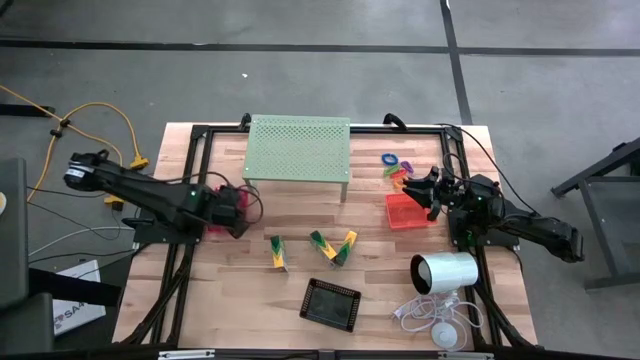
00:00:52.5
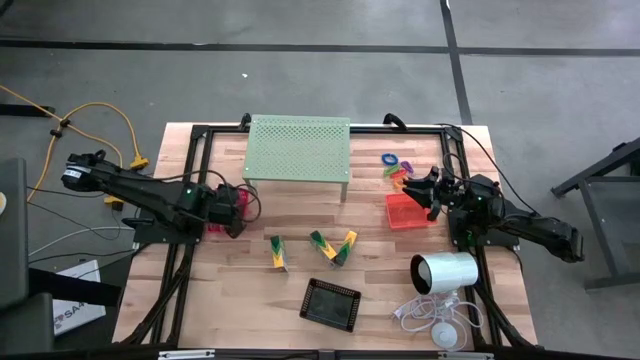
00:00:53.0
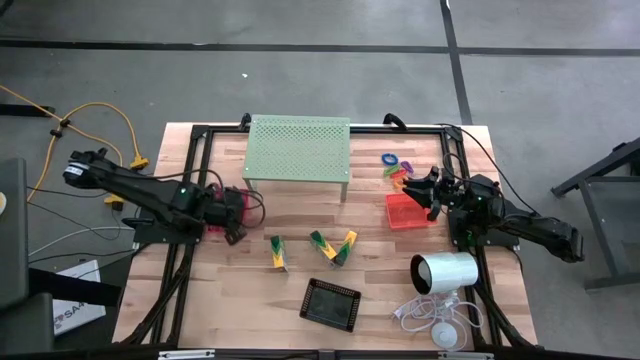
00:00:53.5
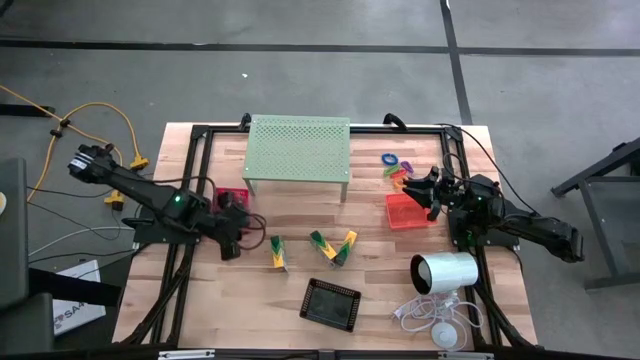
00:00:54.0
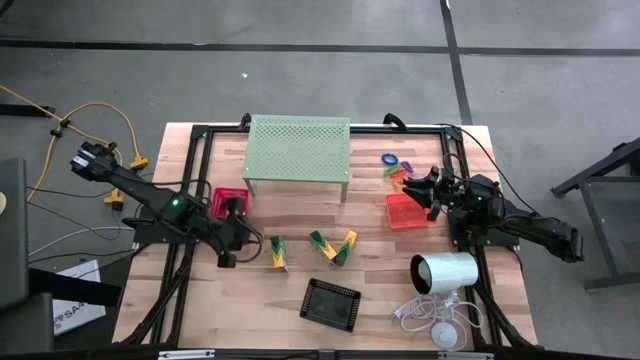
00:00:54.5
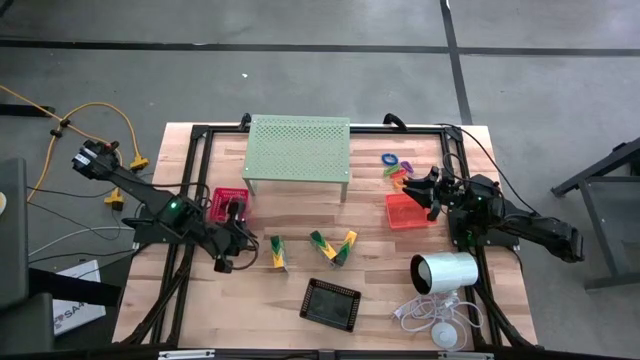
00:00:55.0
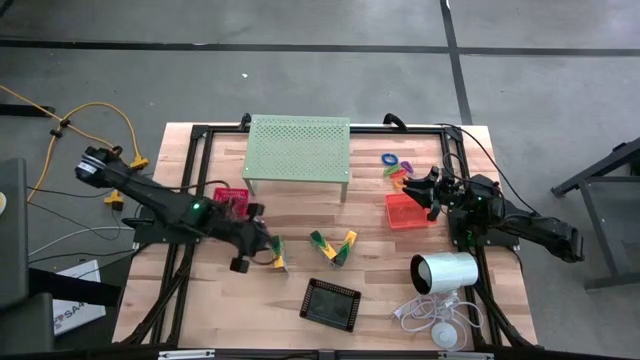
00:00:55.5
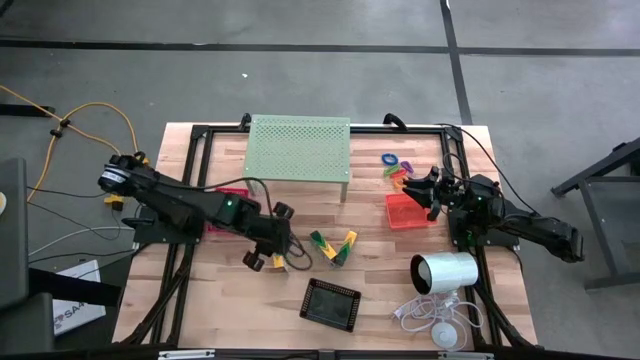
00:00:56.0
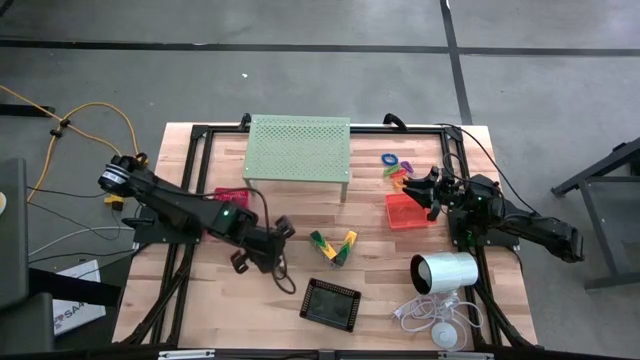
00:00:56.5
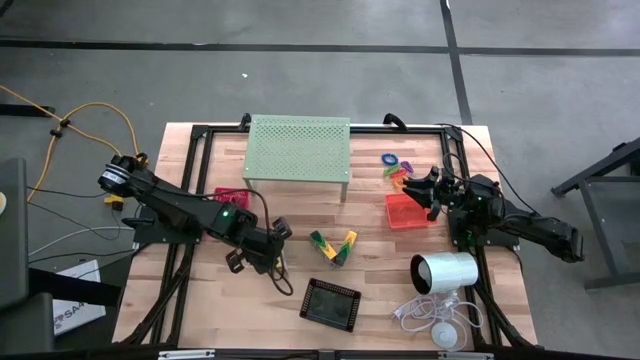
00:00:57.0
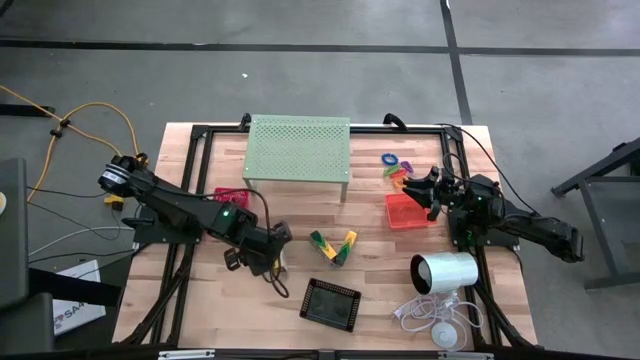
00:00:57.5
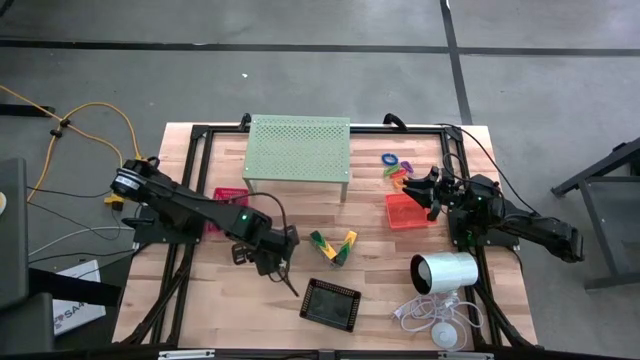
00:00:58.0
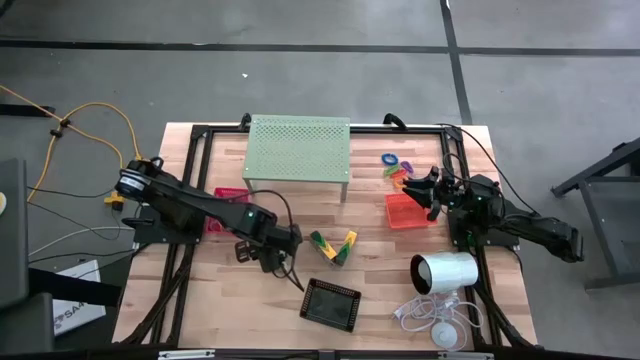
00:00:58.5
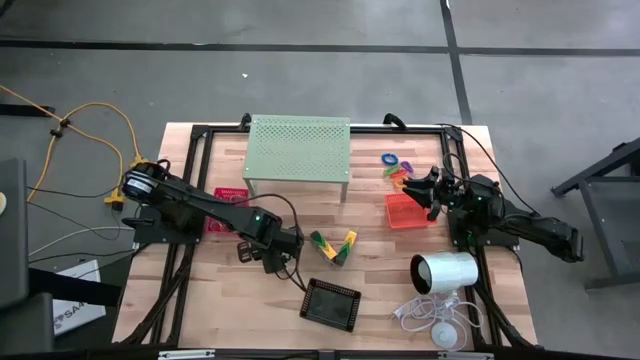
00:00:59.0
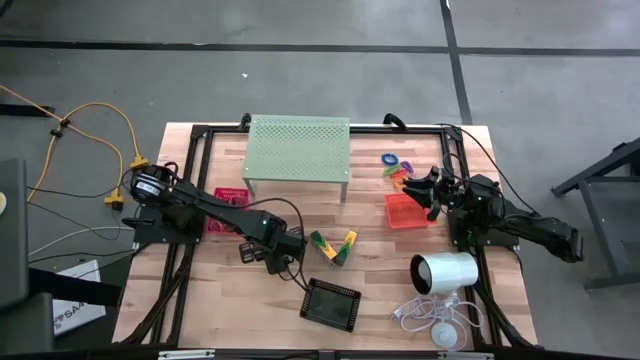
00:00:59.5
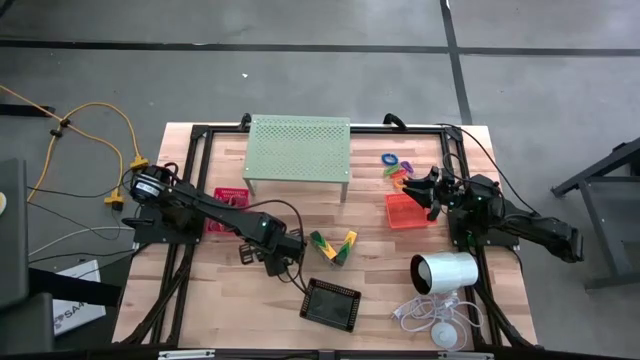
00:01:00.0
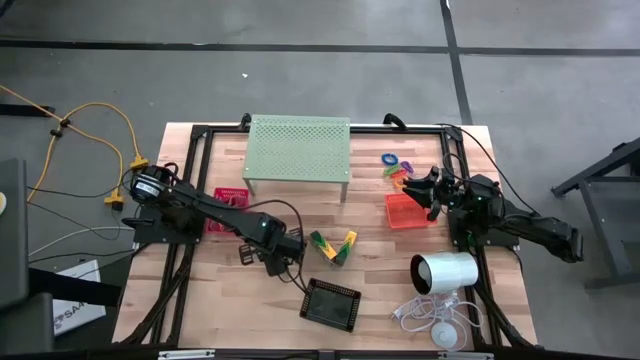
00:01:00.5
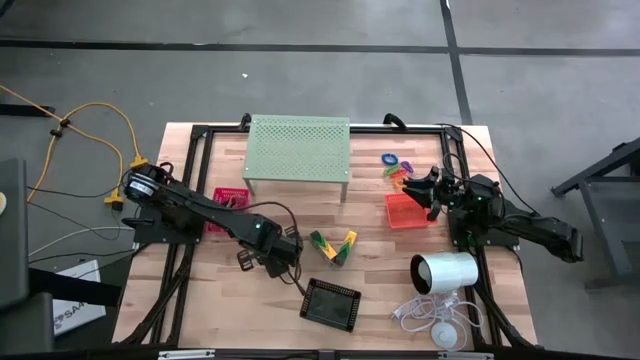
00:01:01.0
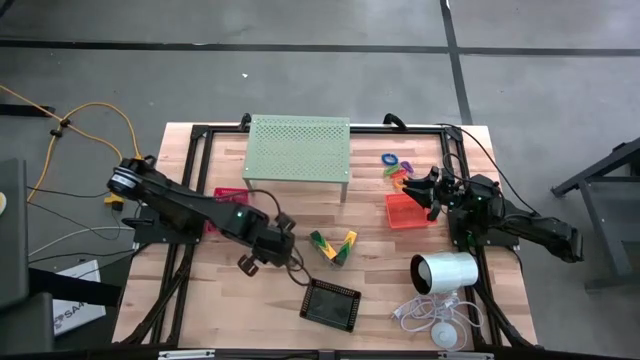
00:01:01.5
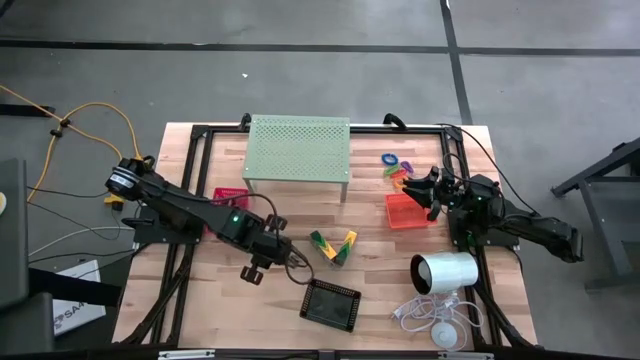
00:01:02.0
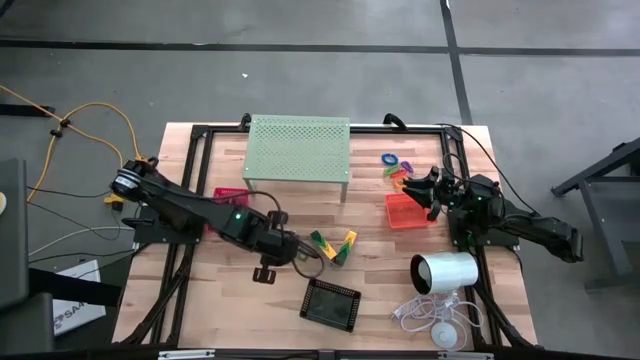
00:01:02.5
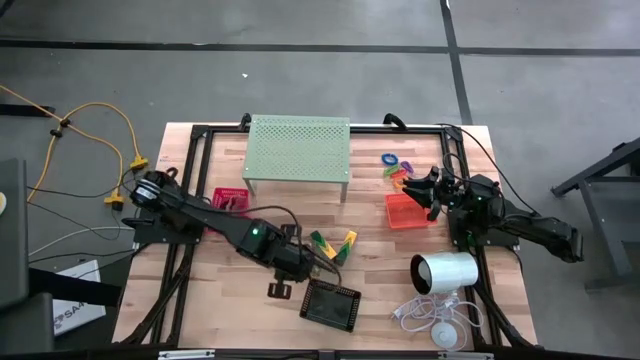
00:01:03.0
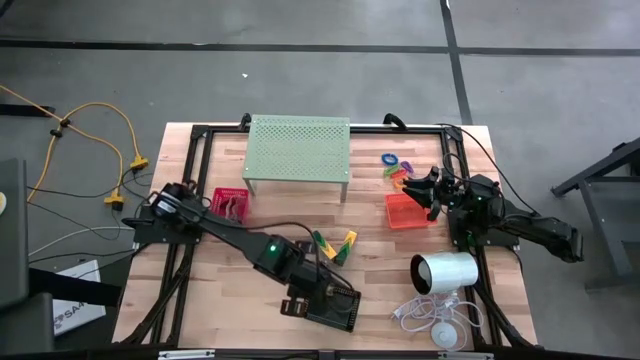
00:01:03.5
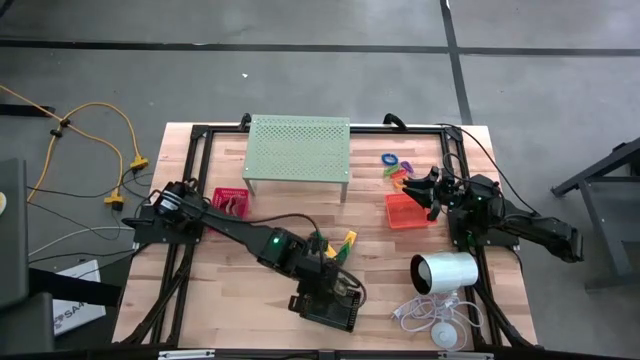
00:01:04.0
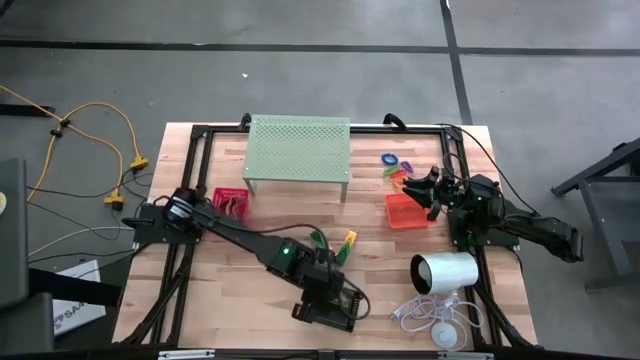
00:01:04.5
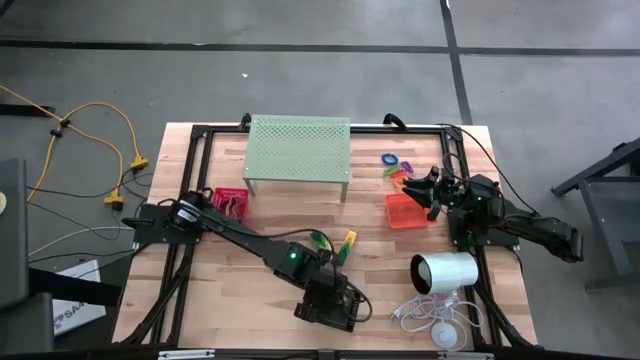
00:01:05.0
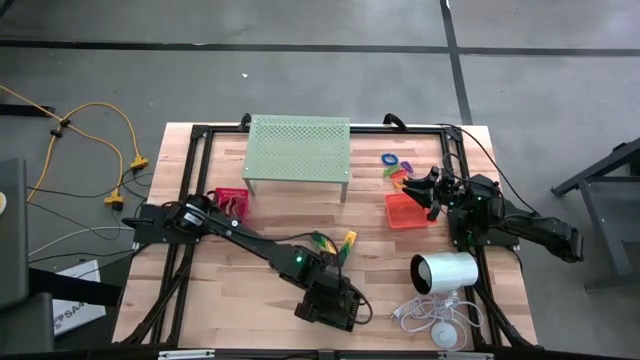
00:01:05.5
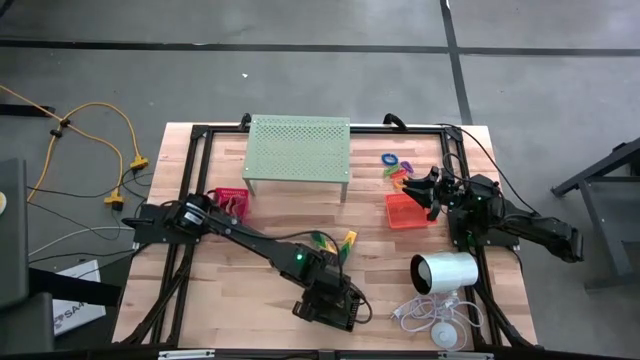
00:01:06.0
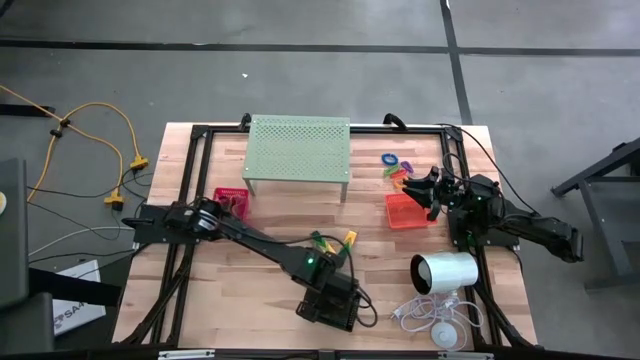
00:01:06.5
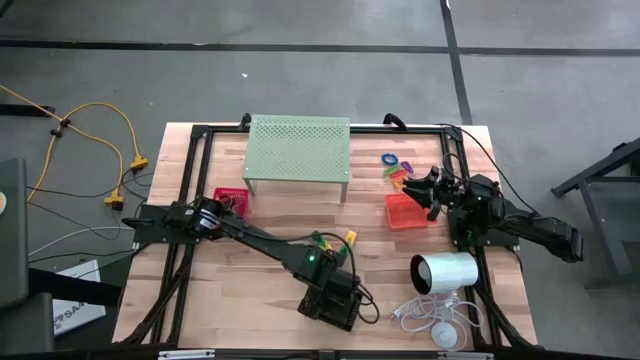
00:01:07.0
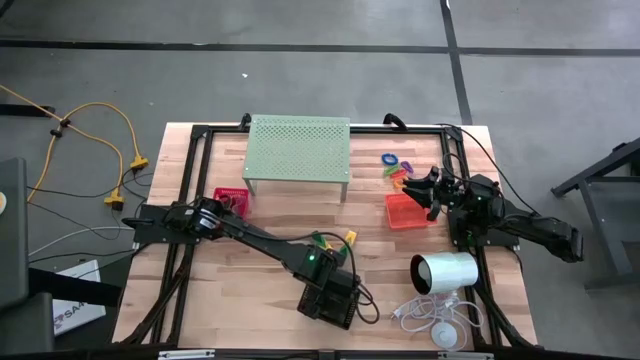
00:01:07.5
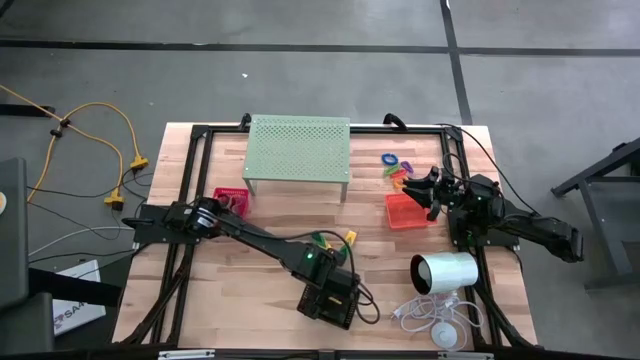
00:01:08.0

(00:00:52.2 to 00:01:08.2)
Task: Pick & Place Office Desk Supplies
Put the crayon box into the black bin

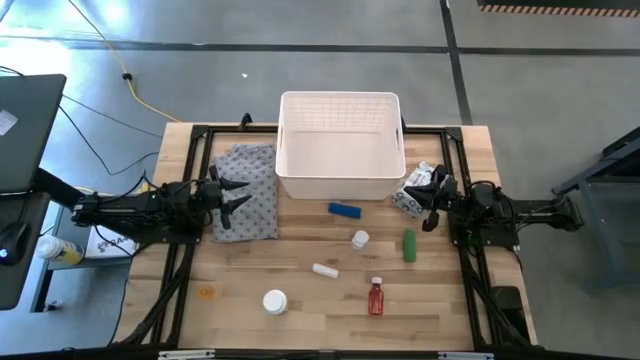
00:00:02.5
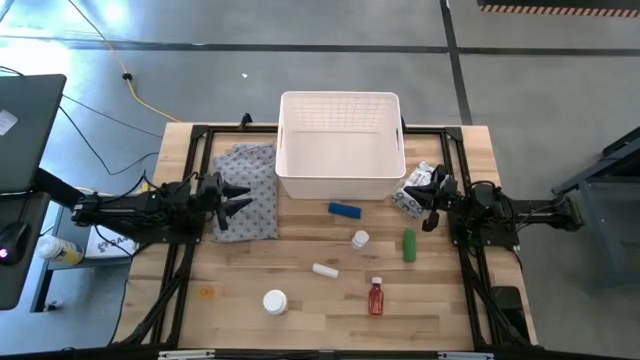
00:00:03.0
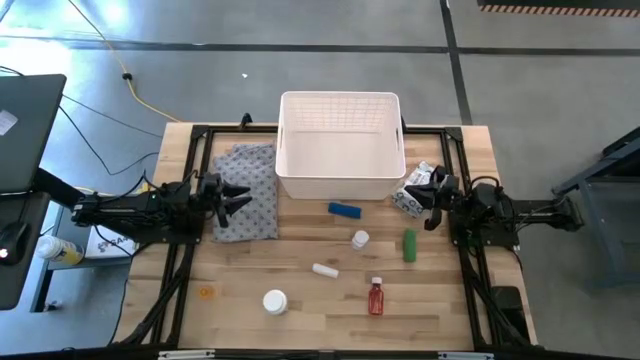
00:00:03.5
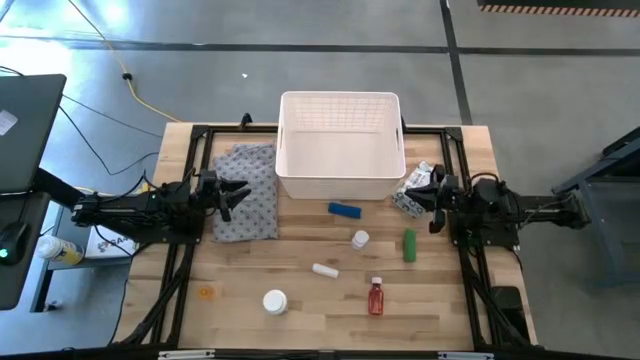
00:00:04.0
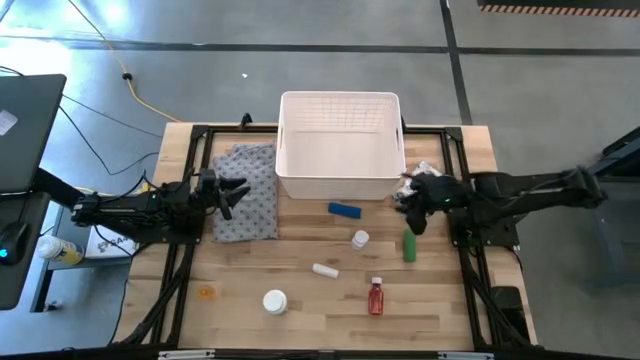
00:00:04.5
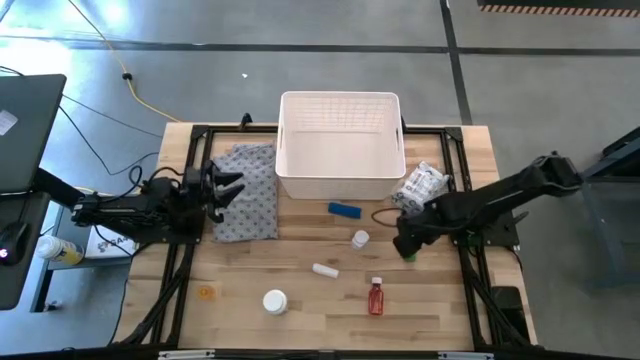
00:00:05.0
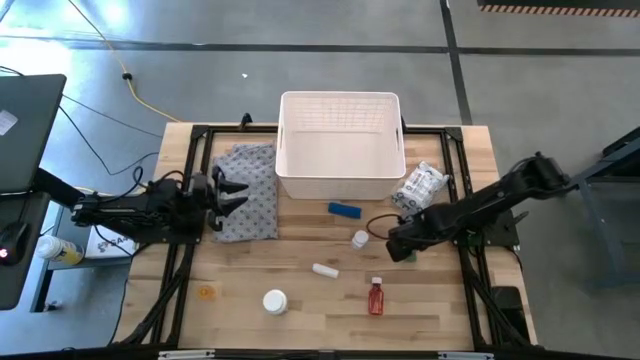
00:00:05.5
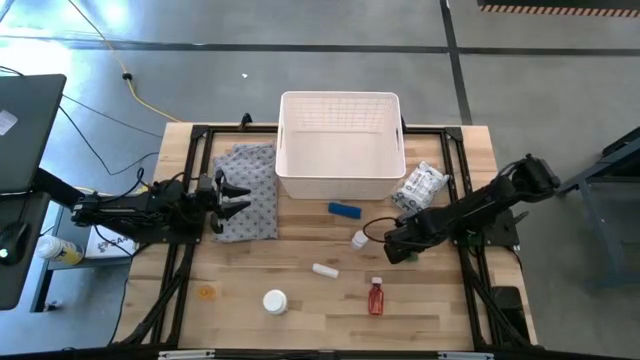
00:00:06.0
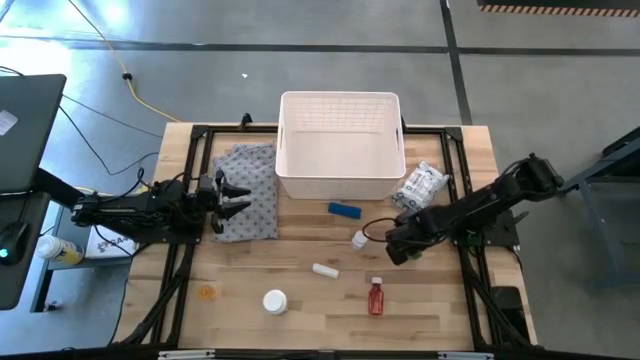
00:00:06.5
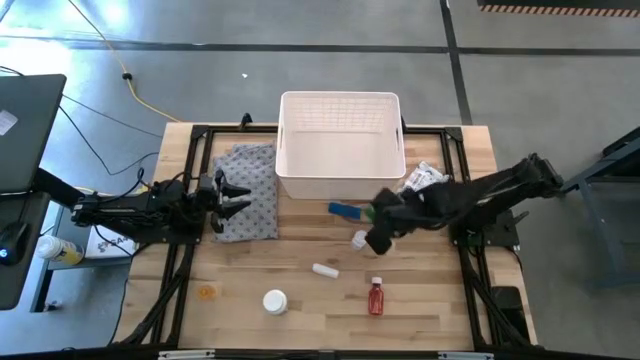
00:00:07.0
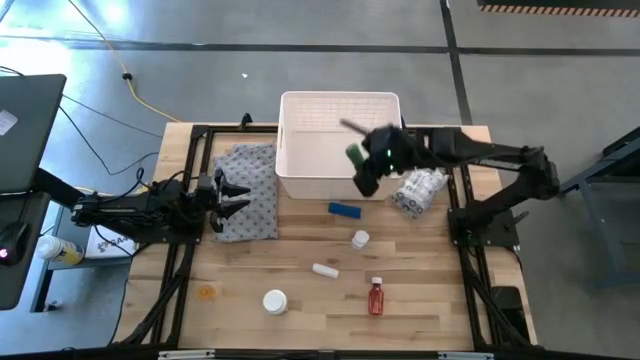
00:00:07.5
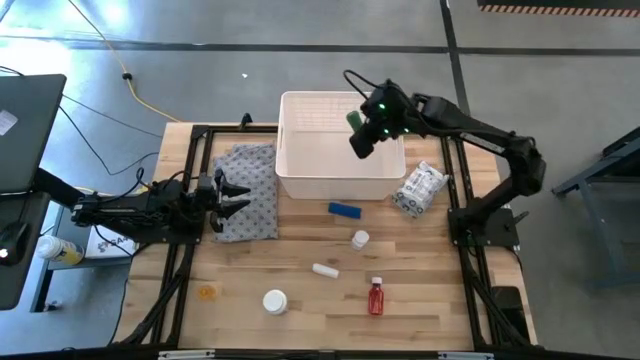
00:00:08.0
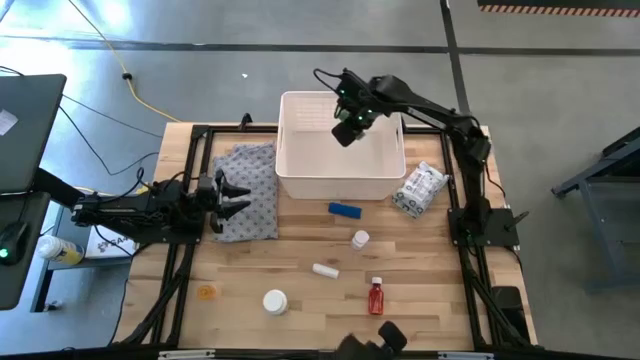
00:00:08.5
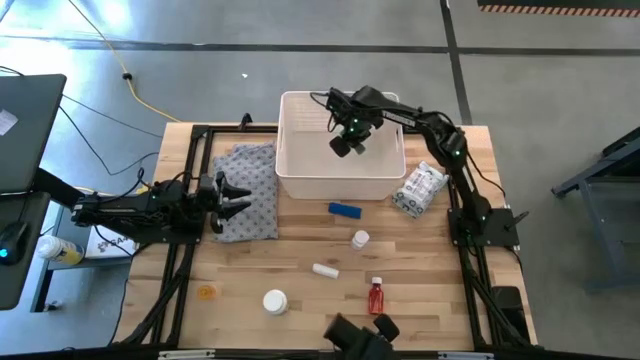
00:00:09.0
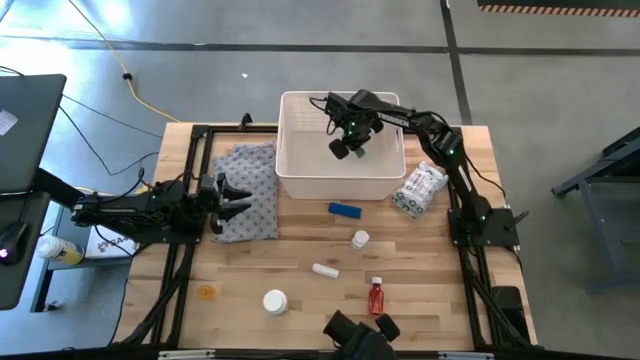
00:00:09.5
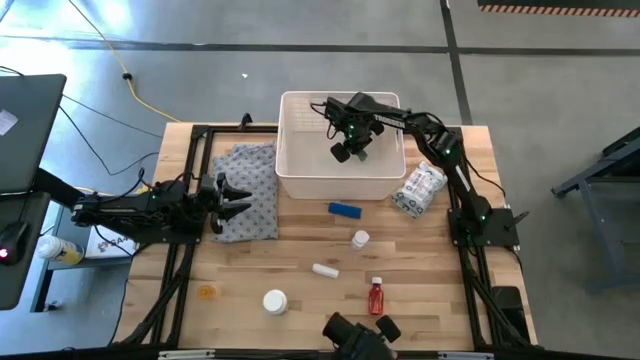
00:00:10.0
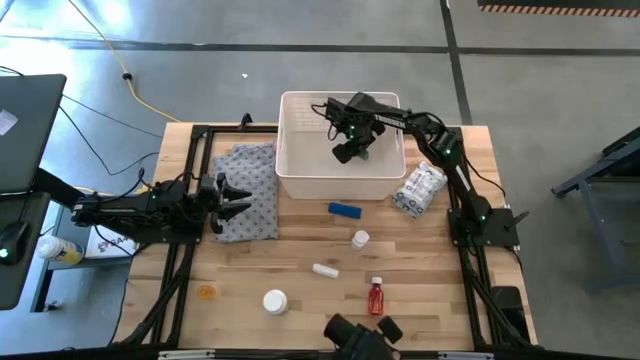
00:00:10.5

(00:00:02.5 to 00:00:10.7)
Task: Pick & place medical supplies in basket/bin
Put the green bandage into the white bin
